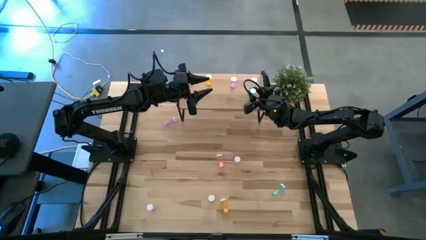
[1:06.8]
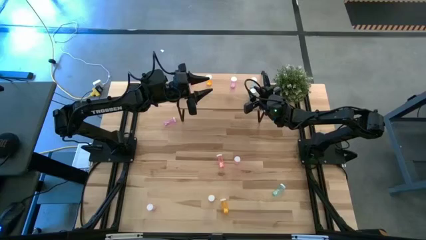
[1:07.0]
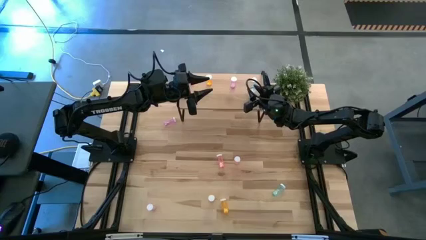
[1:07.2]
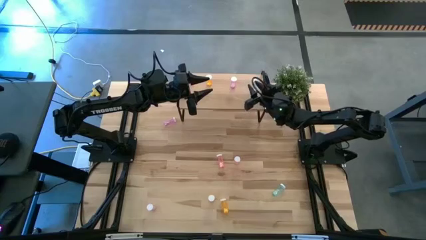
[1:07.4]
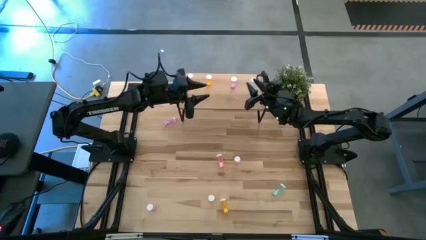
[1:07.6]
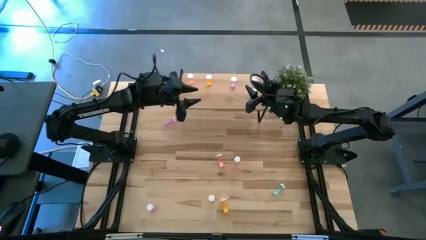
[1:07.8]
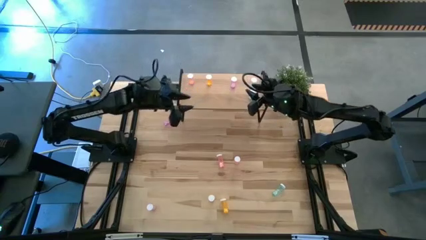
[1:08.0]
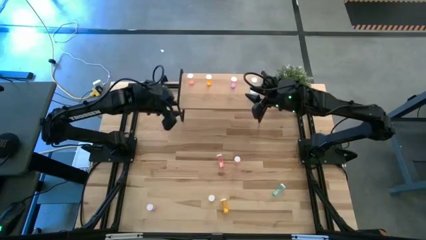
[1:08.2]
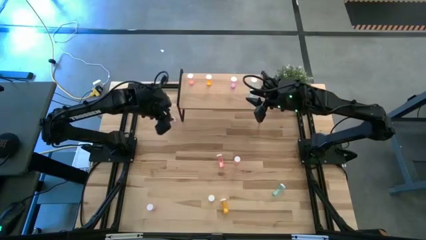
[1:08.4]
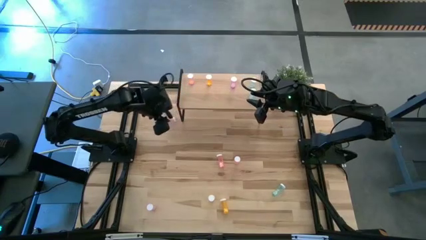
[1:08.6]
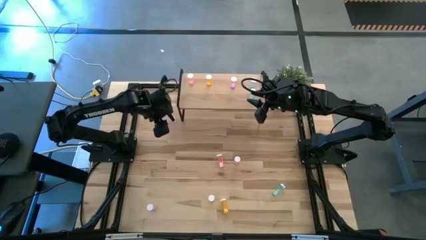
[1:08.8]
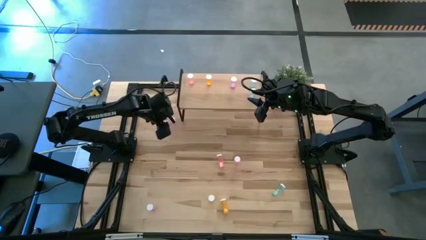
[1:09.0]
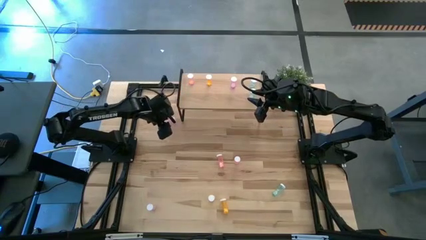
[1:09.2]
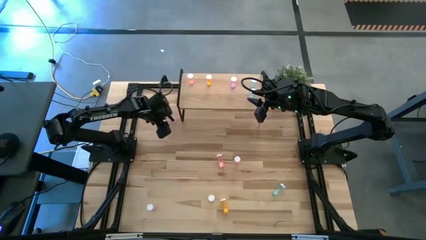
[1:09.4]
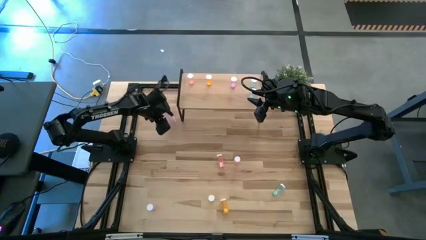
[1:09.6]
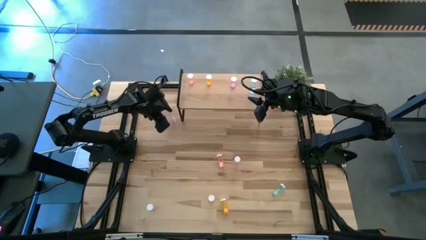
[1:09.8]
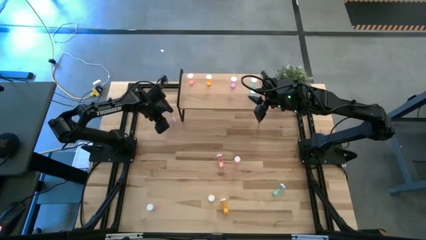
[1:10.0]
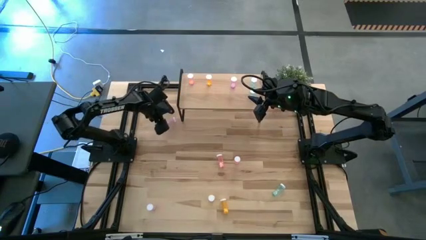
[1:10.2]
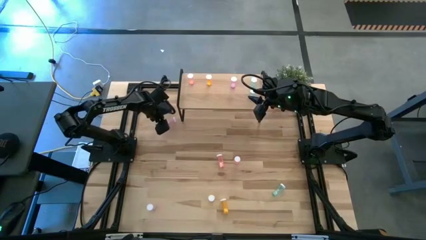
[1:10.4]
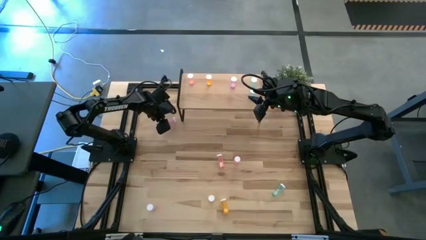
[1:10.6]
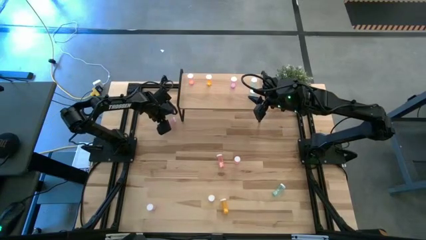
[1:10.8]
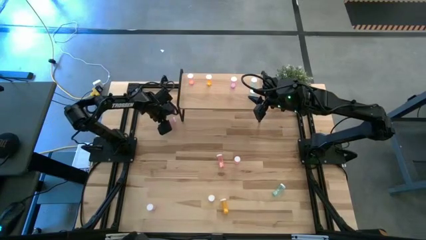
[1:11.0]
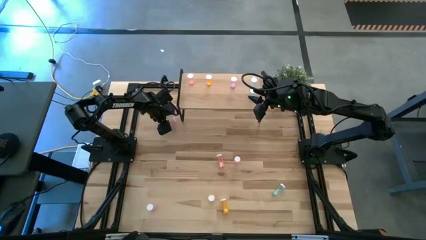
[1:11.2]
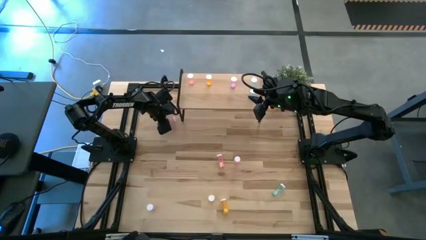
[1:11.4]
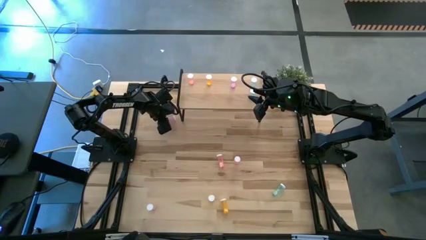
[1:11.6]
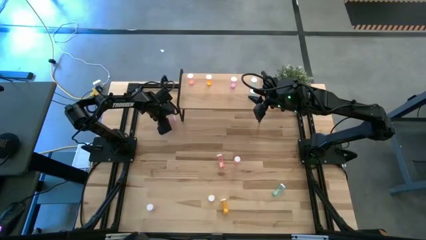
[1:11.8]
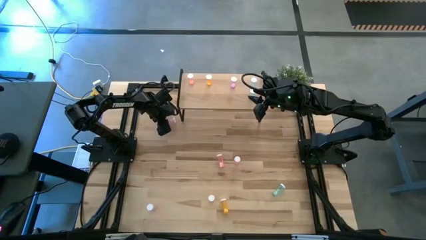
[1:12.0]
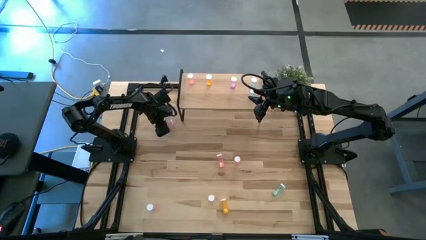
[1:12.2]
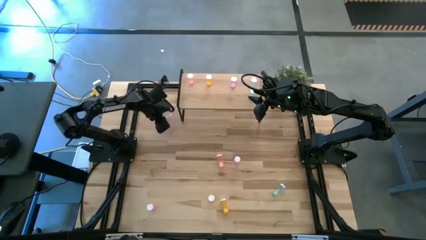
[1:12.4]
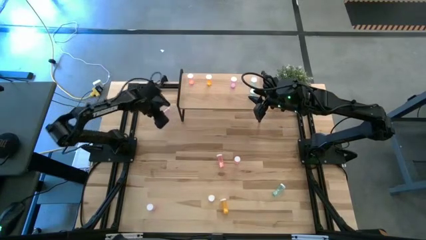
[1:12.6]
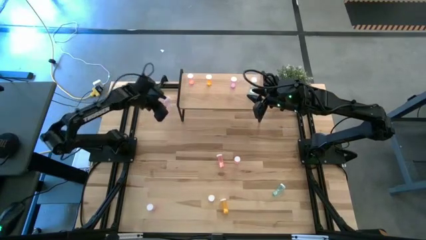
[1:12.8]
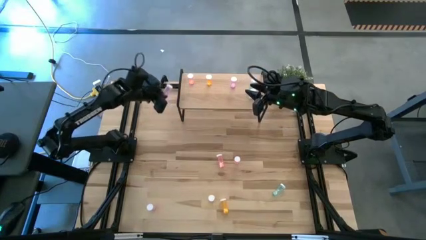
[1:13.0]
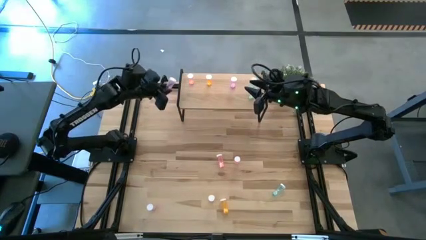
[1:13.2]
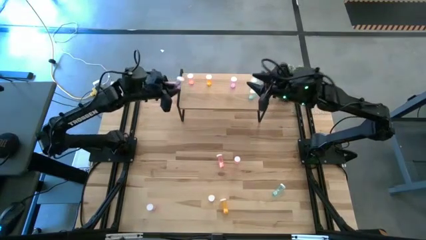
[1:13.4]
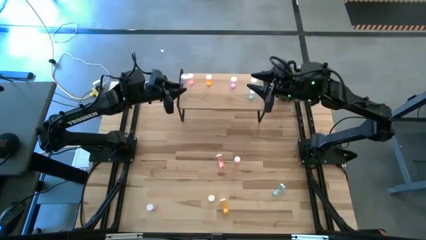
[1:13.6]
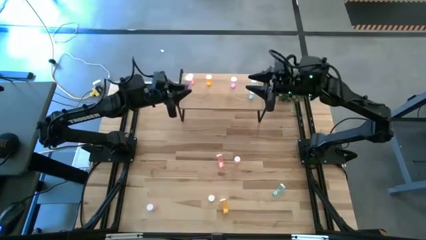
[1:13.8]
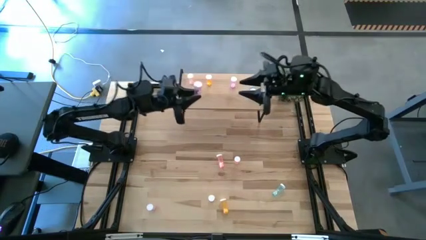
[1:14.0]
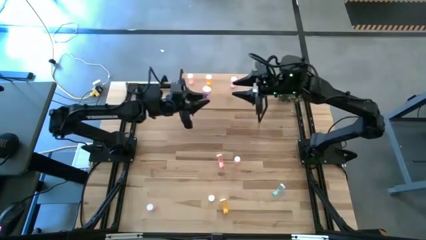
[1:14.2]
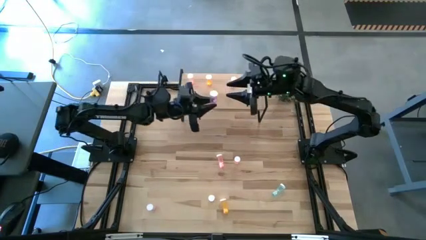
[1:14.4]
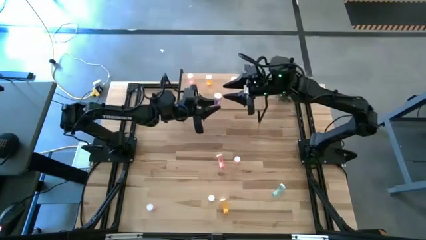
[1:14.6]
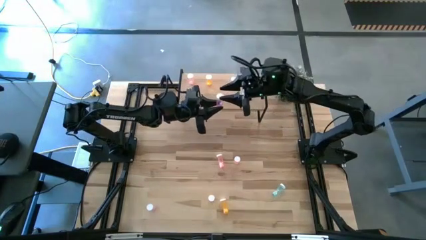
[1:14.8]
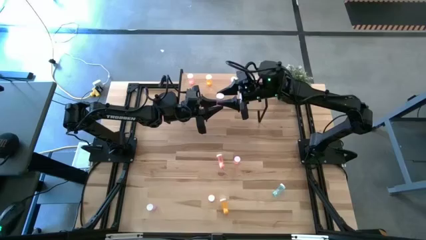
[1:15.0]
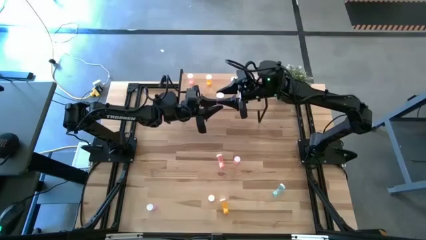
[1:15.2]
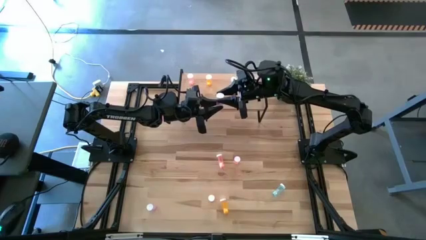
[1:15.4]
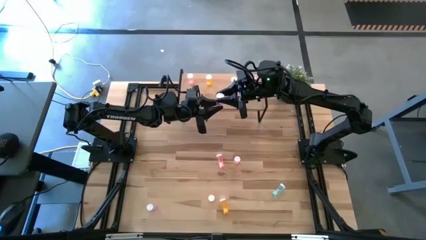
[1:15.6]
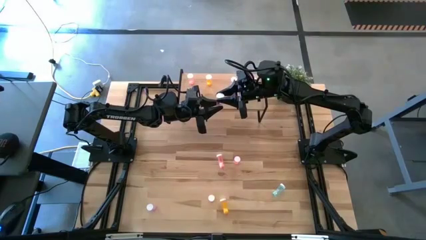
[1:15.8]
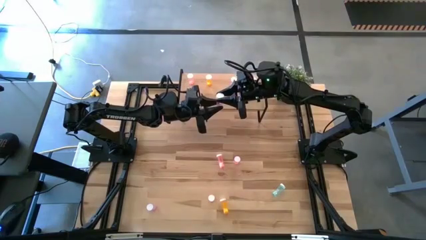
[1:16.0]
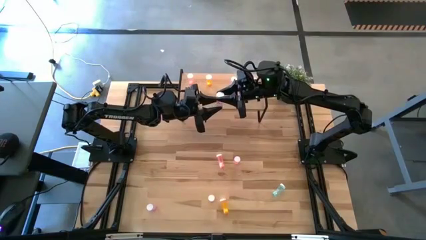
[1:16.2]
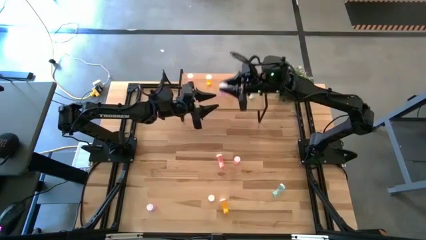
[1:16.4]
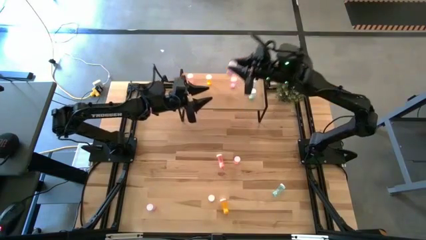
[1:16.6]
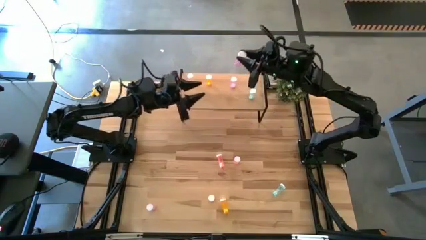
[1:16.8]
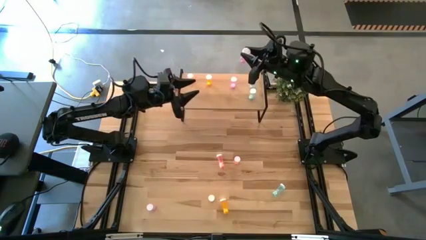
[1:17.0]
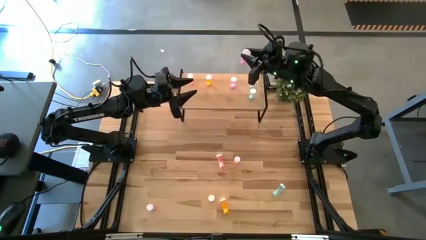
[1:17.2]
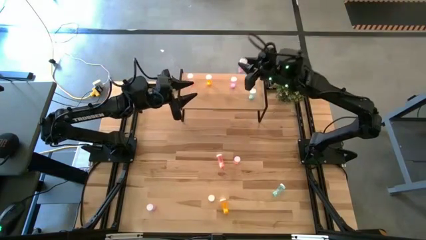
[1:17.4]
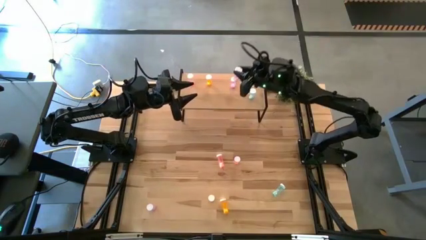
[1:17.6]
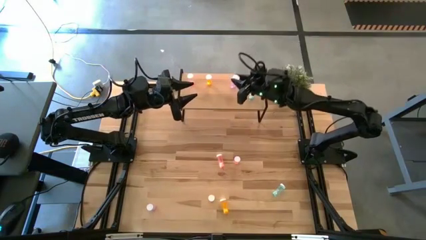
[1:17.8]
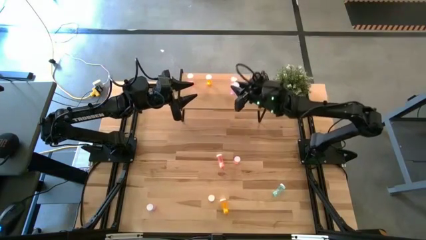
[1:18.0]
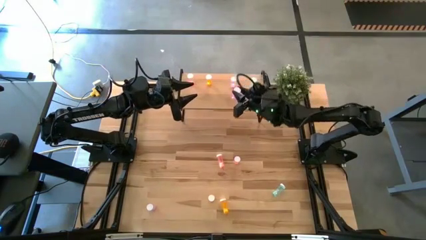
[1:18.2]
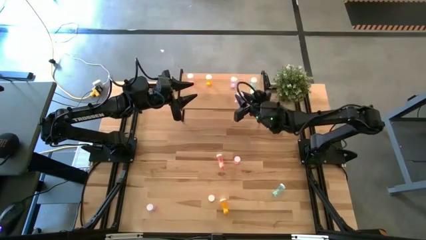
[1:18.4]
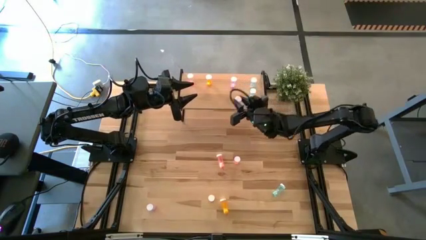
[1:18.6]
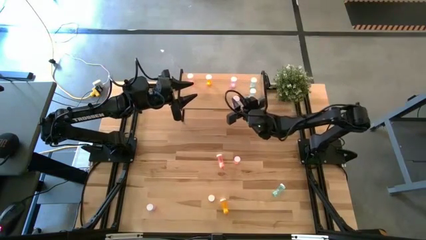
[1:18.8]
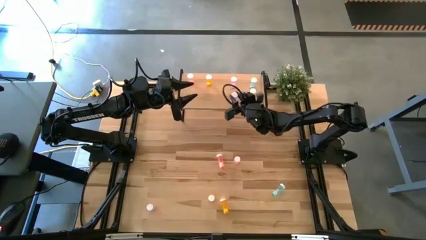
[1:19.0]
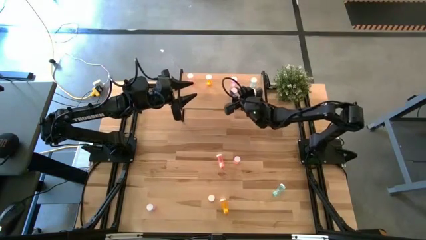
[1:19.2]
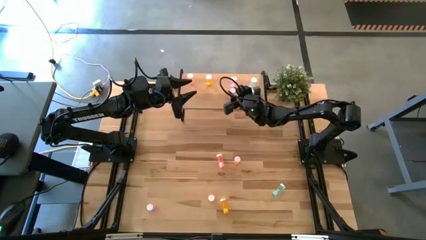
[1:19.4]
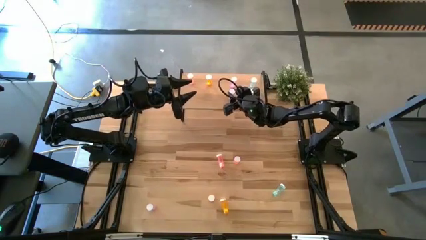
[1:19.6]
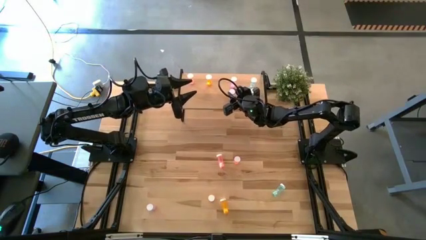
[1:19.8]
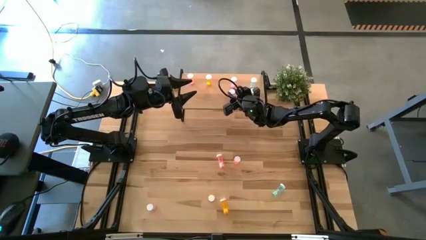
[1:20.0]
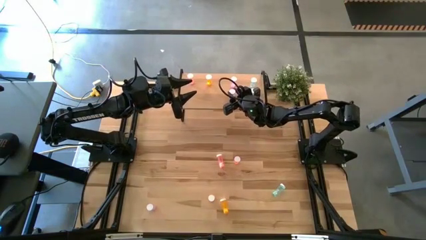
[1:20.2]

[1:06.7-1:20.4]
Task: Pick and place medicine bottles onto shelf by color
Put the top purple pill bottle on the shelf aligned with the other purple pill bottle

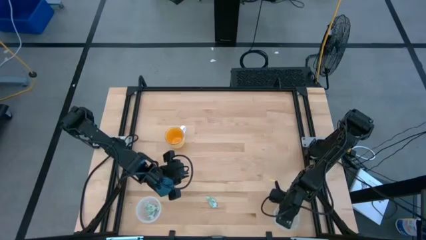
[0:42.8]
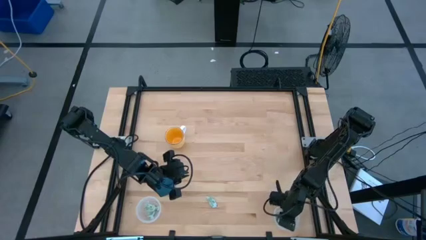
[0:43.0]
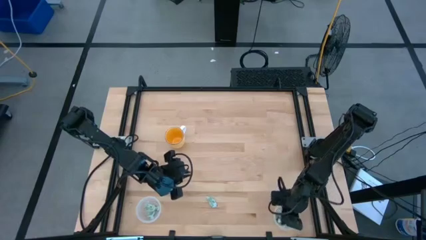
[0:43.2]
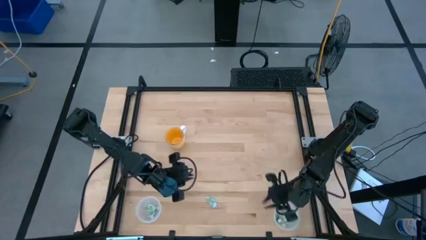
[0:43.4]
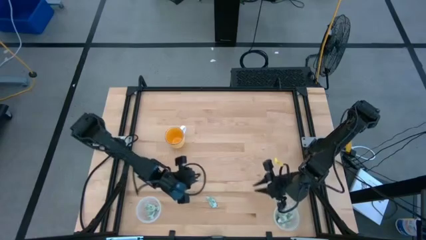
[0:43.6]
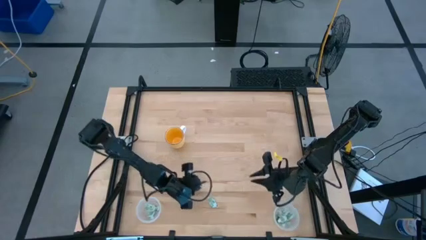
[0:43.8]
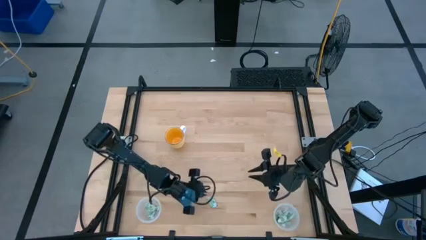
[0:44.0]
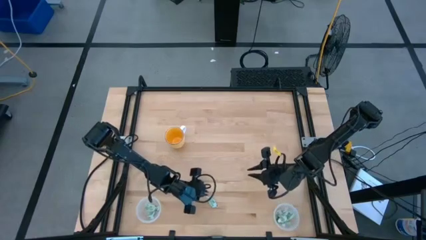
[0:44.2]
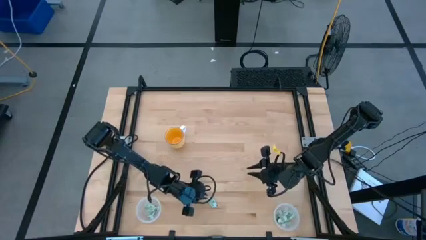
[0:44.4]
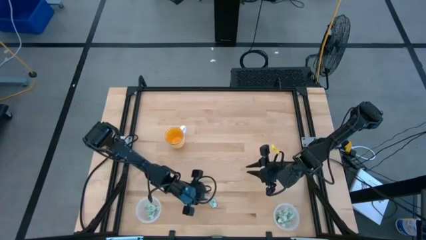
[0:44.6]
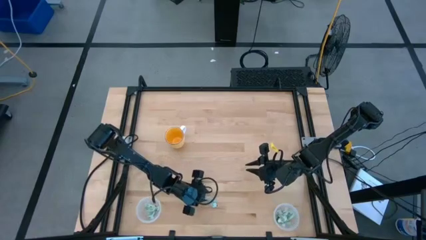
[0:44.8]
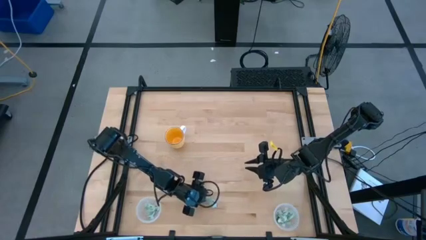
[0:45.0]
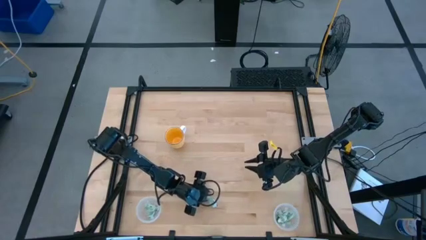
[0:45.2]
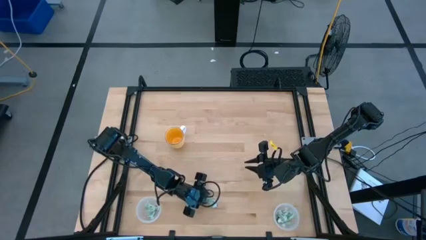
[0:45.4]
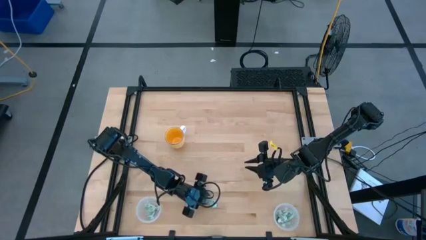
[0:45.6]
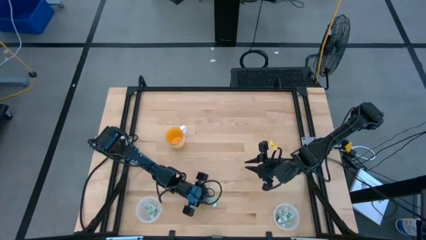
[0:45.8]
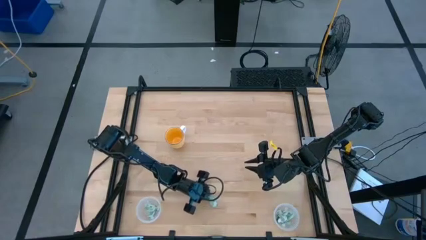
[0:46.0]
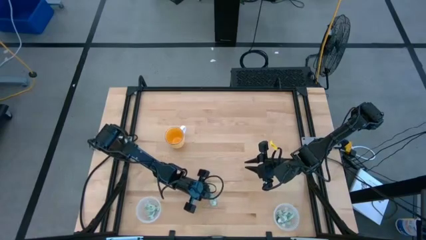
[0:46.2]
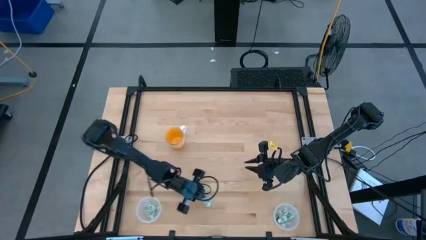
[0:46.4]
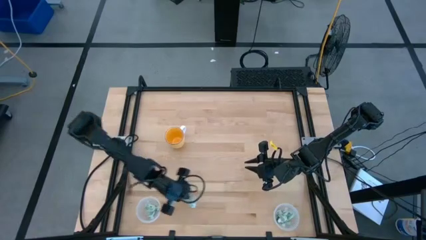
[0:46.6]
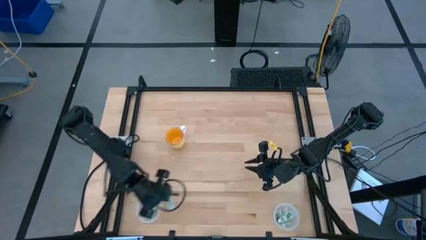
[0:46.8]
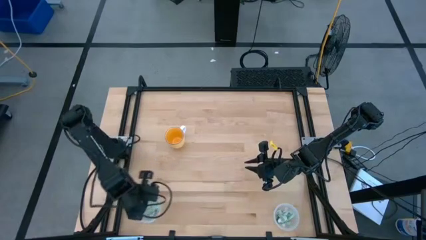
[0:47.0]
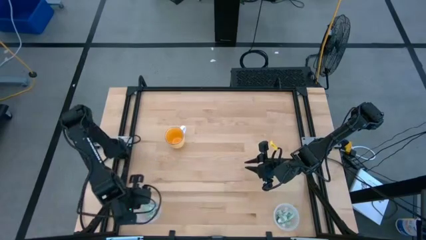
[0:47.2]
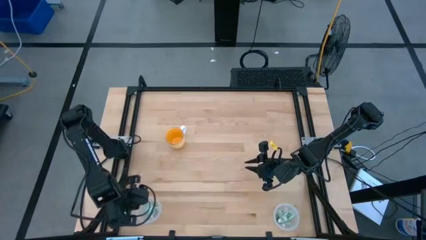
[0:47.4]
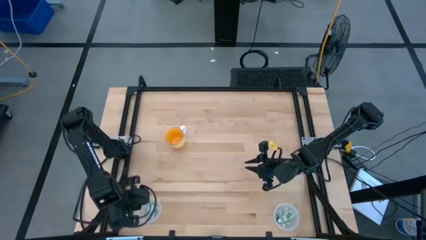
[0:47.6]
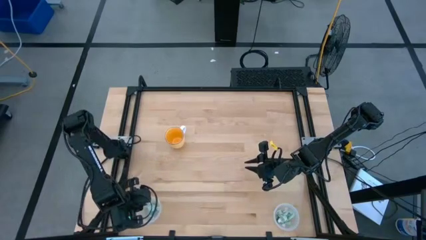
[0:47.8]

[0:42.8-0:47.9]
Task: Pick and place items into bin
Put the stevia packet into the left transparent bin
